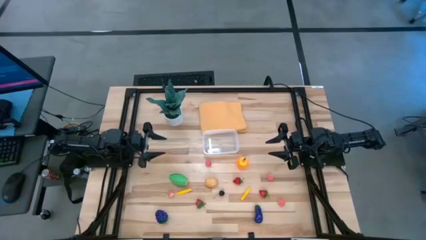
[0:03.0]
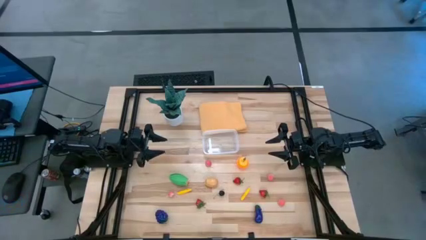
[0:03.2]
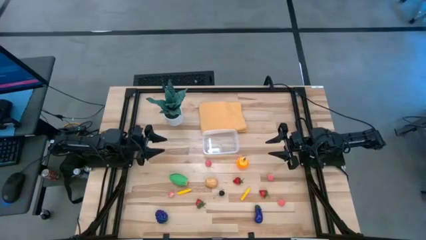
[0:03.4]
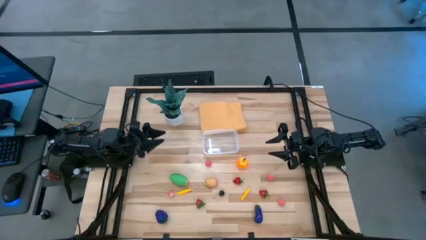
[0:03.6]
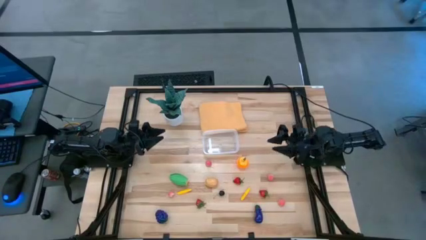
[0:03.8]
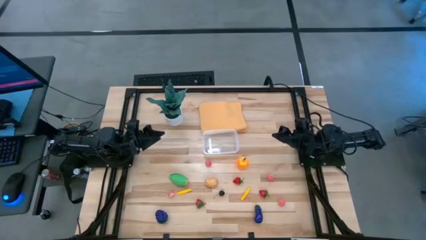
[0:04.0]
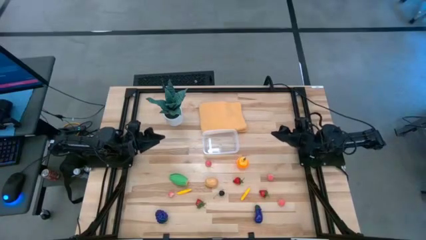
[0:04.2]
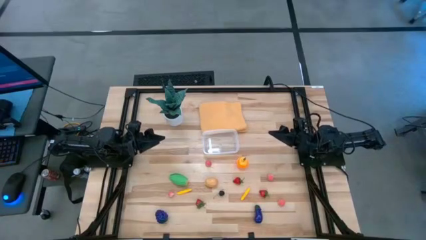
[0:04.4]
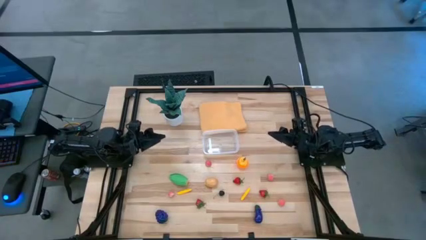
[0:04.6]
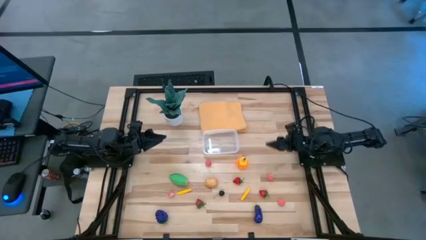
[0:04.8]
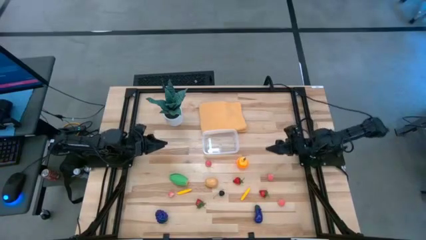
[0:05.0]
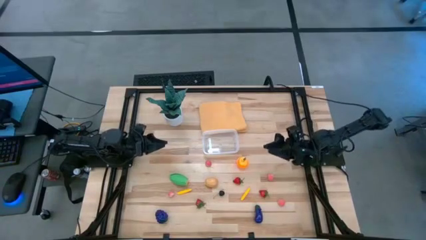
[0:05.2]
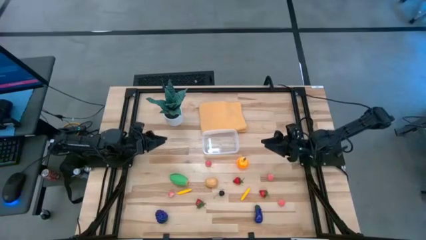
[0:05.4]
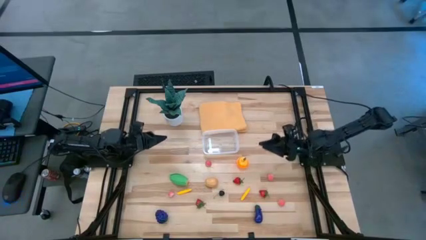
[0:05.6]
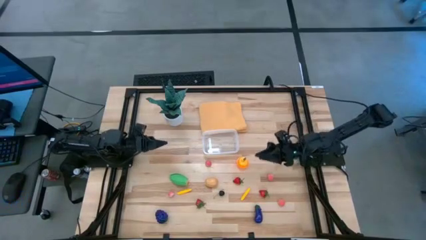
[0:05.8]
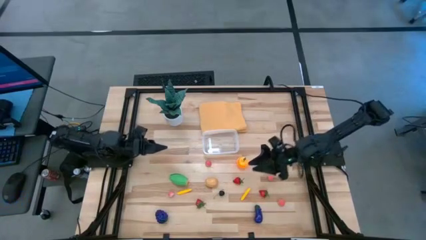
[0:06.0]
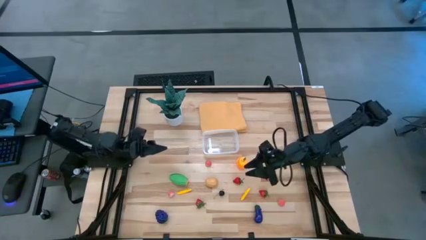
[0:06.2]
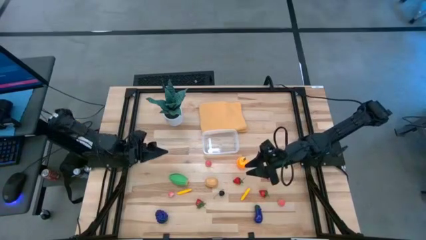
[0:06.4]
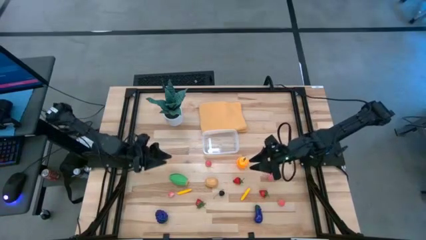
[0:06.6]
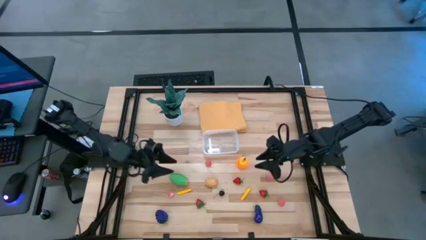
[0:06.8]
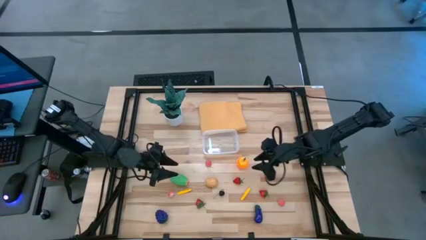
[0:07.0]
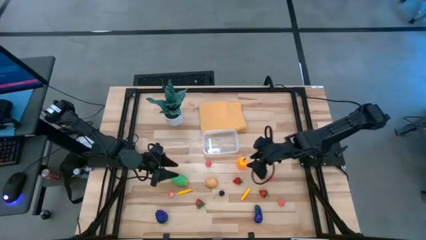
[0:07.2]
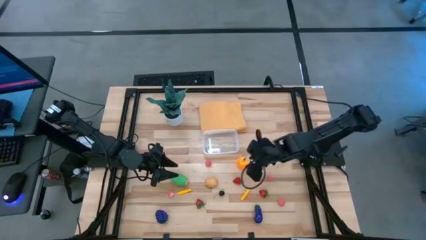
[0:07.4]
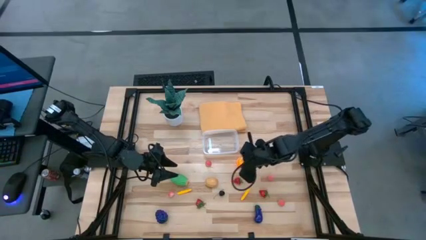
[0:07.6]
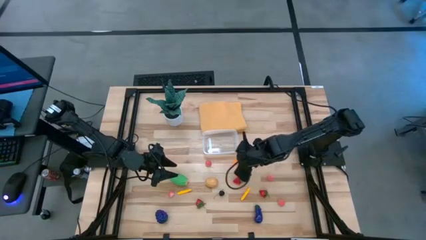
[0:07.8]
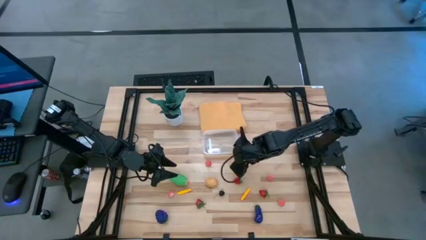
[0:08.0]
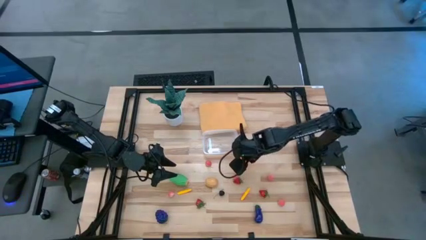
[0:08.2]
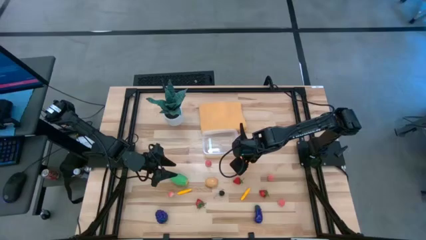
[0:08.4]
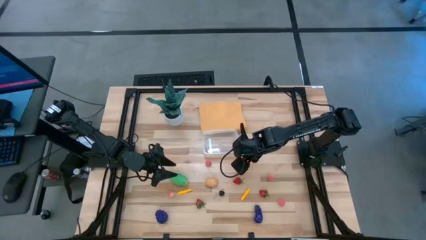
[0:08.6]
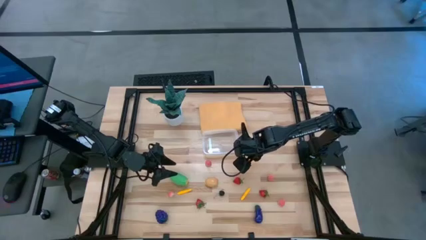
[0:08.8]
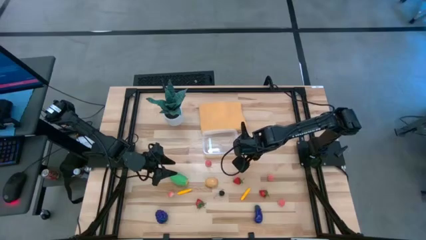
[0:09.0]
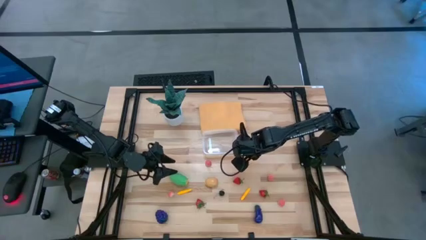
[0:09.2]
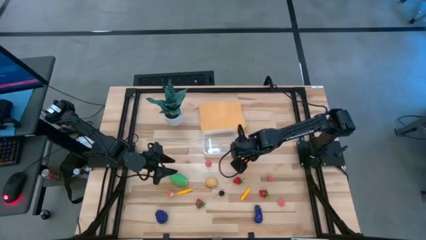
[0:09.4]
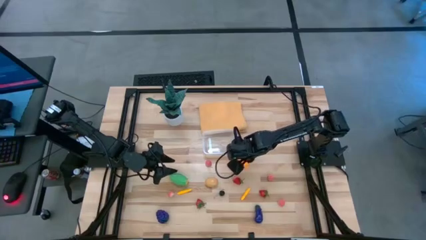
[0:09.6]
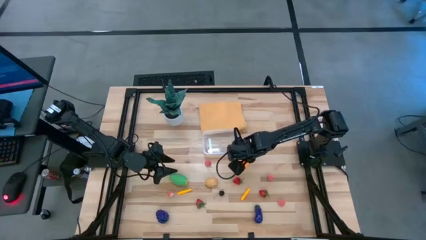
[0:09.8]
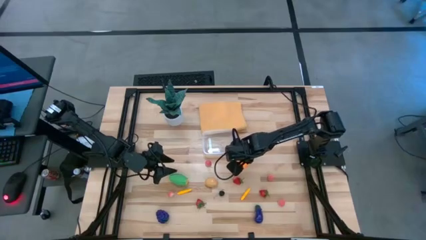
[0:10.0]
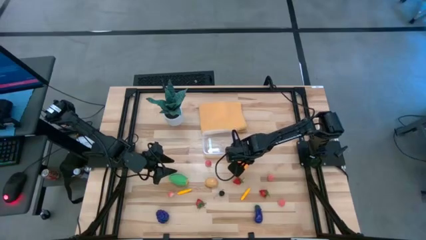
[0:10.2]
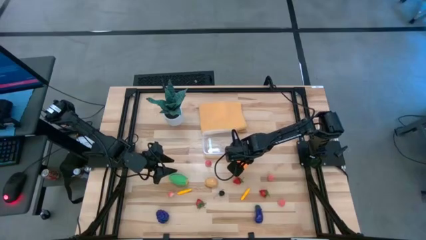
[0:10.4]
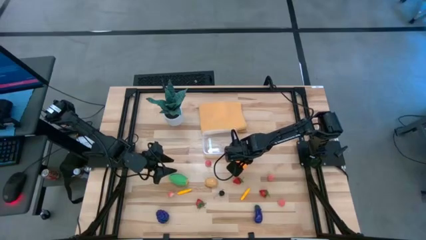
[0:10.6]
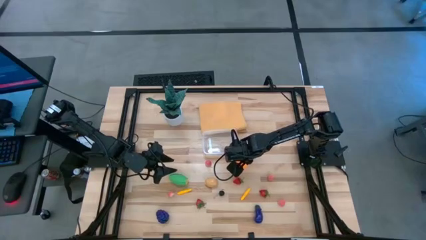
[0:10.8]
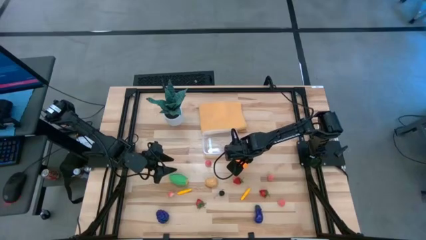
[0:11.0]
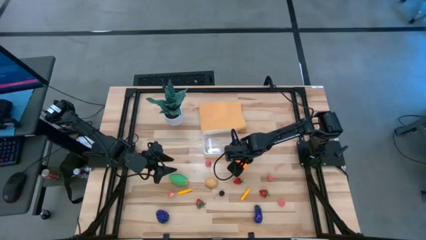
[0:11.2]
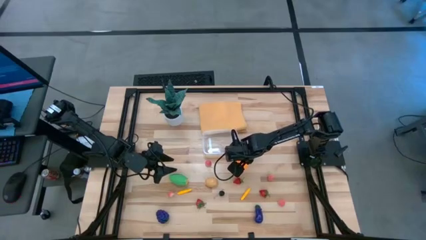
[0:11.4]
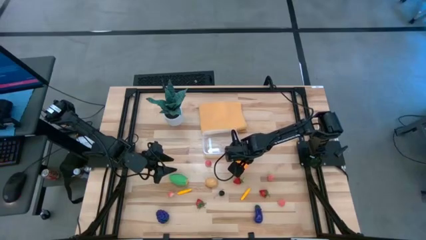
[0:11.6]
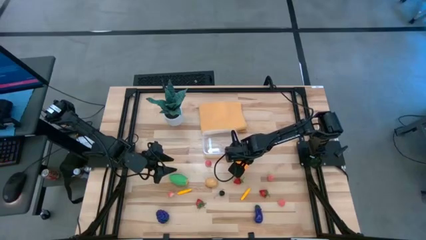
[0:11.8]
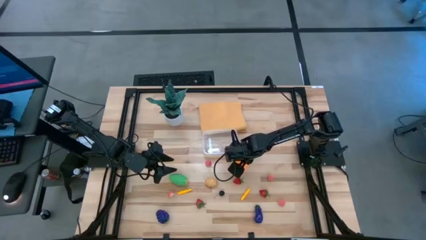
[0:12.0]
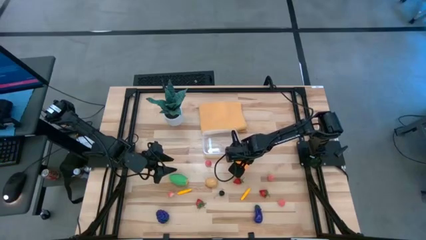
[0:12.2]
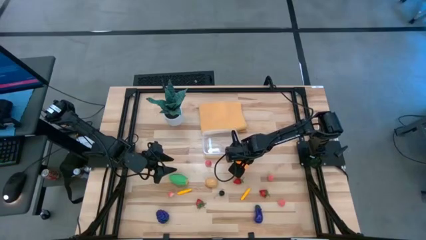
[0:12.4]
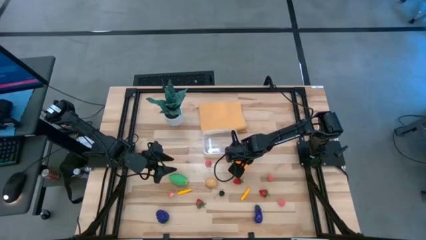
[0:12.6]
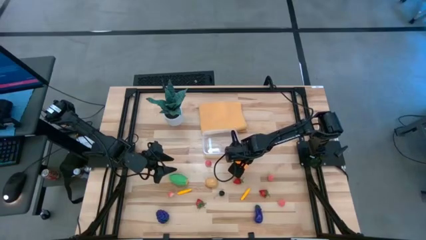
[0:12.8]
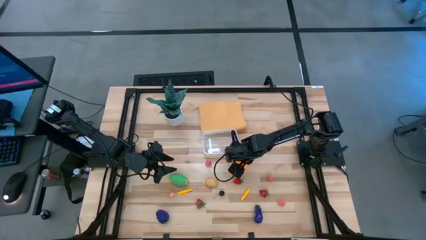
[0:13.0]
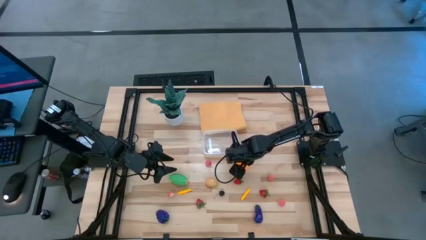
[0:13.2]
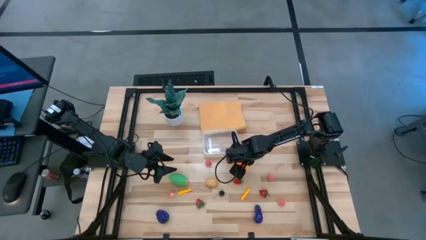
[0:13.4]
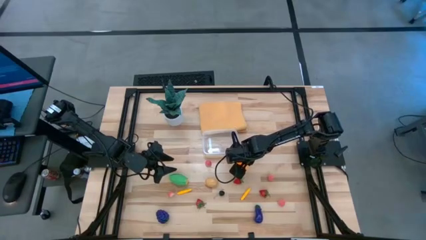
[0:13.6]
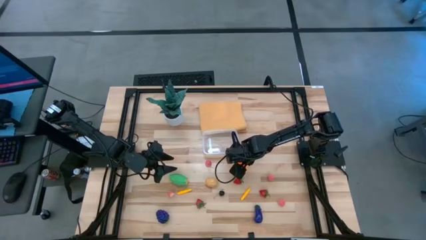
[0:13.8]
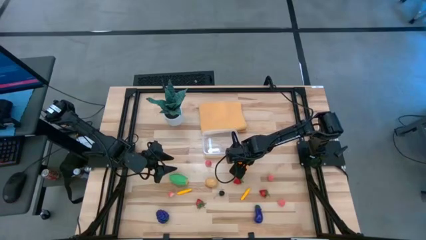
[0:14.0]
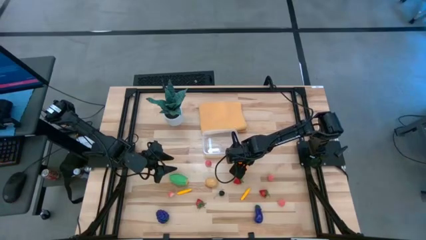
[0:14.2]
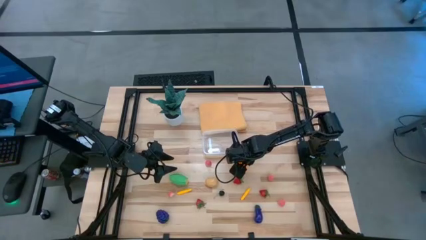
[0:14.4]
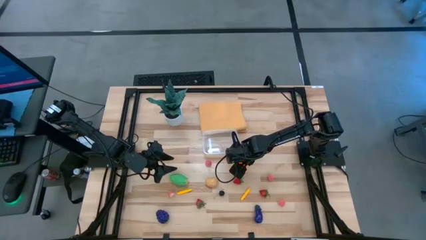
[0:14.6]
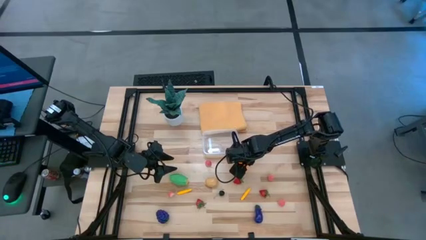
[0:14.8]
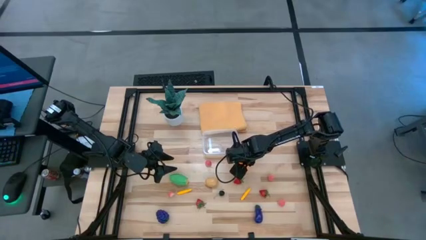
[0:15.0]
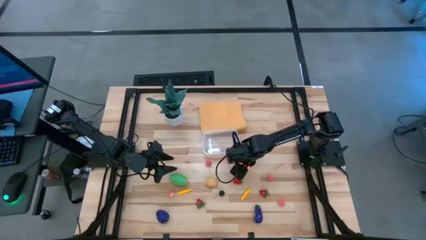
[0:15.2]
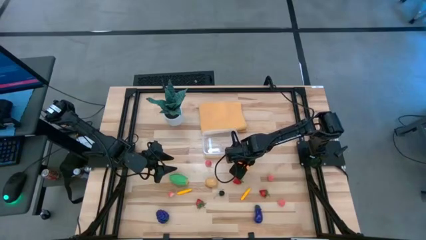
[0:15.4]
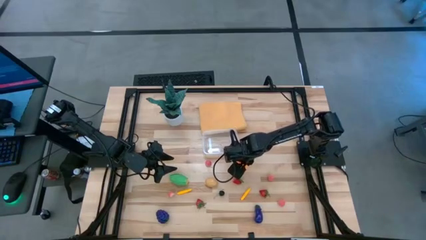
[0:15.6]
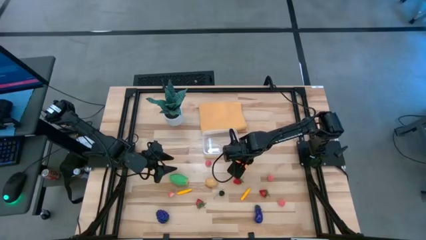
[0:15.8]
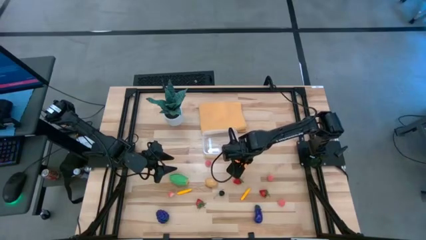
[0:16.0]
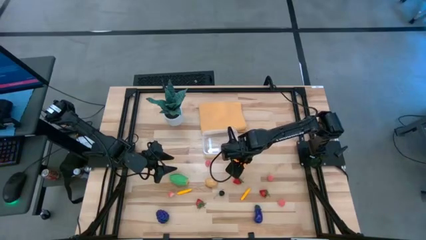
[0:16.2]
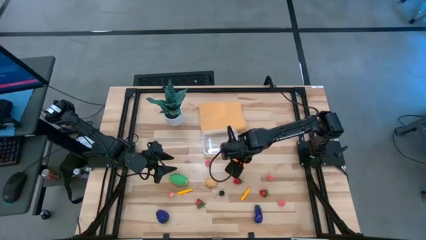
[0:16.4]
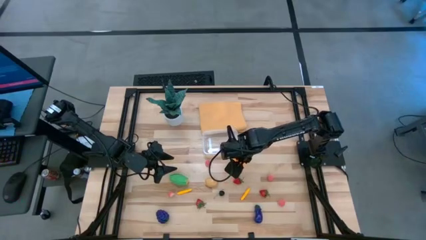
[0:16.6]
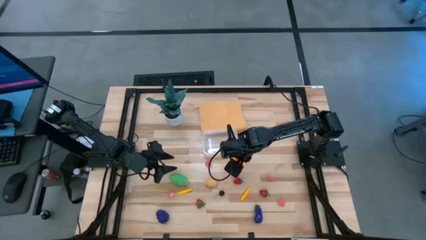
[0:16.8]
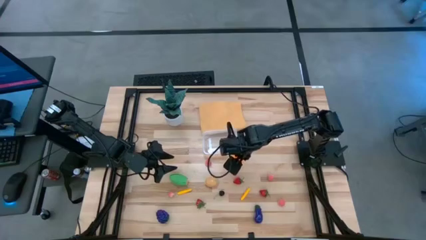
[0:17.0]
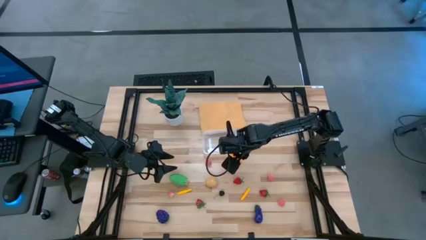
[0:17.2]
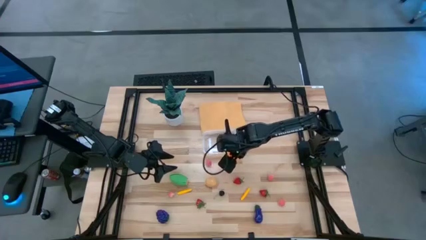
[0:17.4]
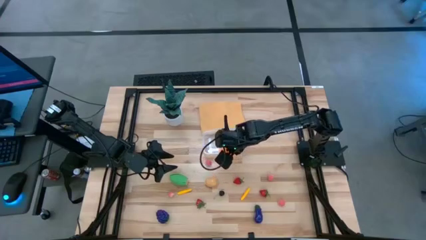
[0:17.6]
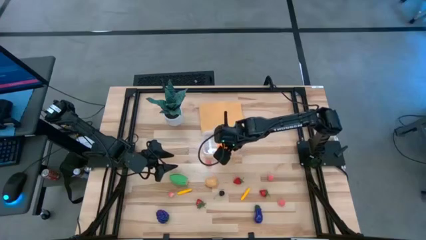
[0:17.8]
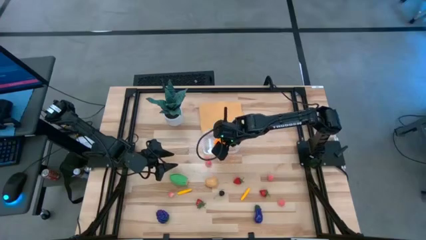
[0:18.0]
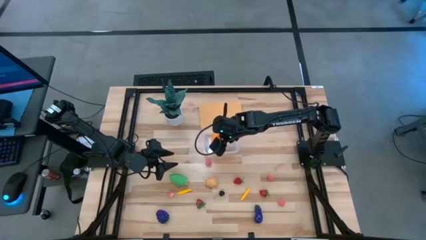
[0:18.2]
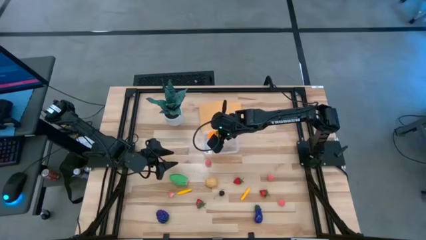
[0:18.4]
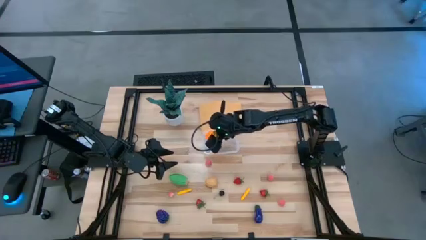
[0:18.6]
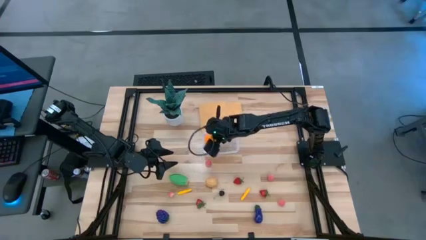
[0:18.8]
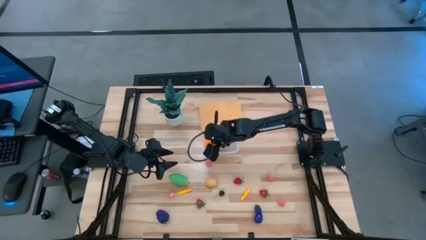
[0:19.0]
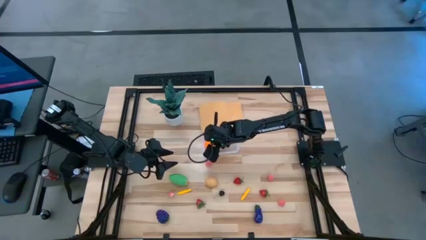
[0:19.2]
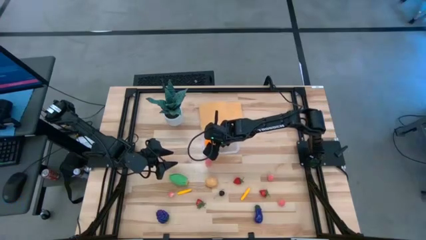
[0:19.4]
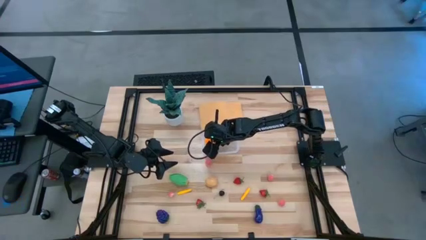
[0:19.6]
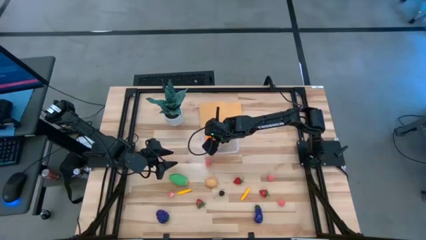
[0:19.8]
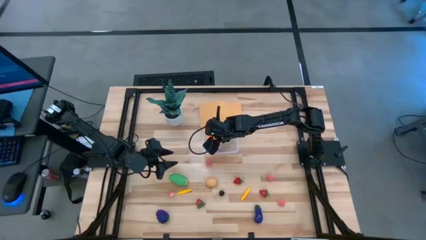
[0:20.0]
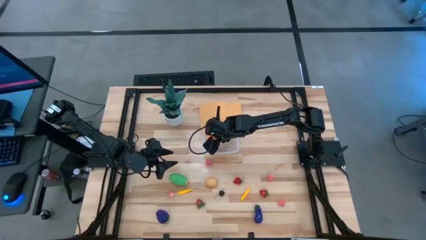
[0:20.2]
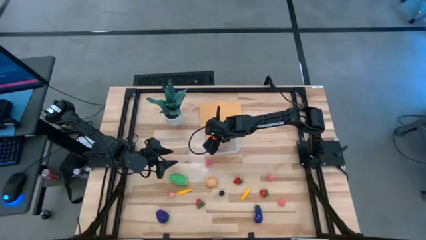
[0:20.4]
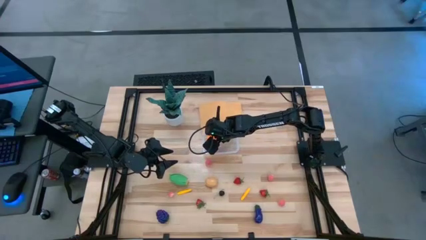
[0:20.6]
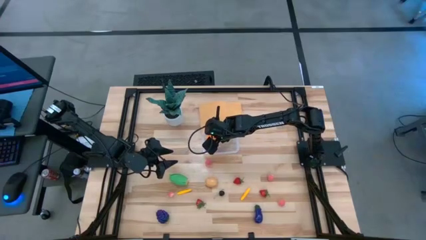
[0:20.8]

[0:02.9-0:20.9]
Task: Pick and placing Produce into tupperware
Put the orange into the transparent bin
